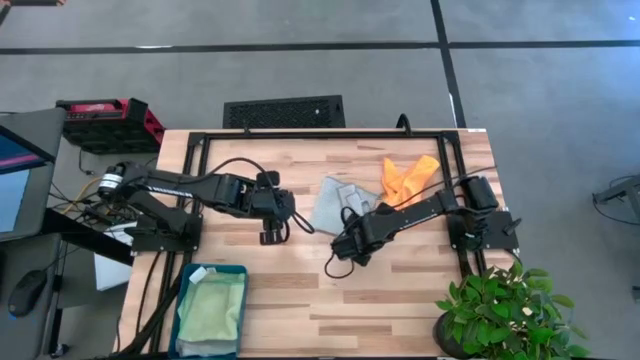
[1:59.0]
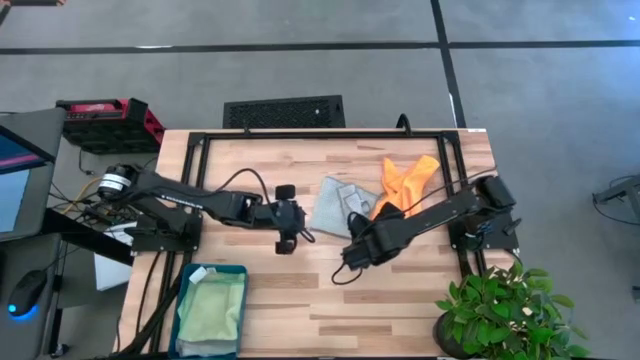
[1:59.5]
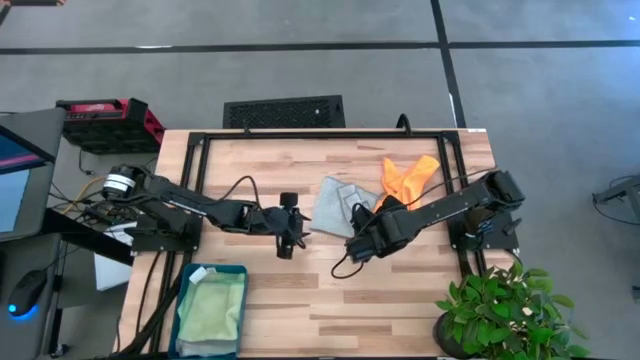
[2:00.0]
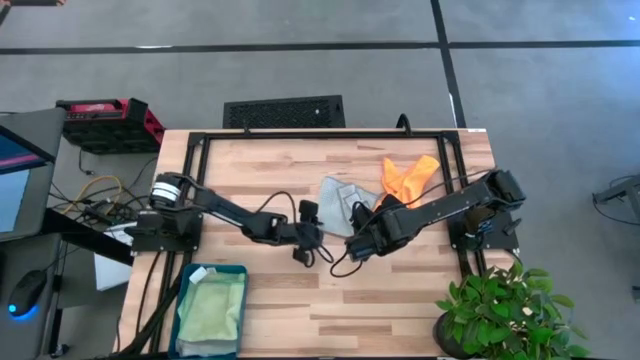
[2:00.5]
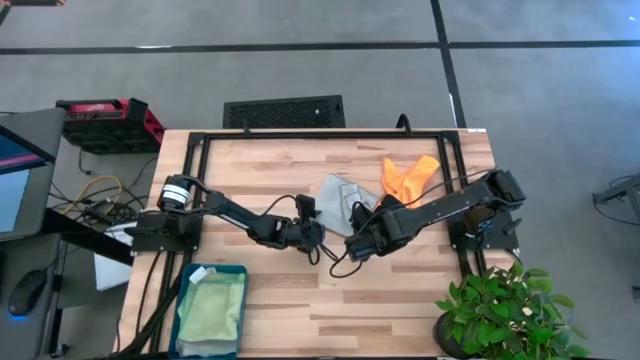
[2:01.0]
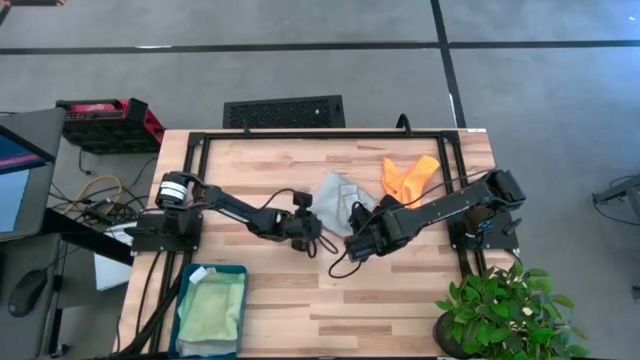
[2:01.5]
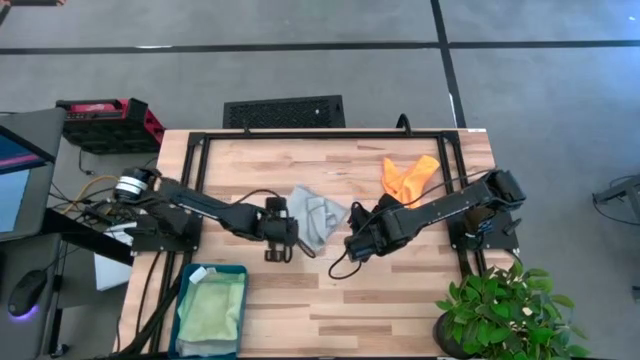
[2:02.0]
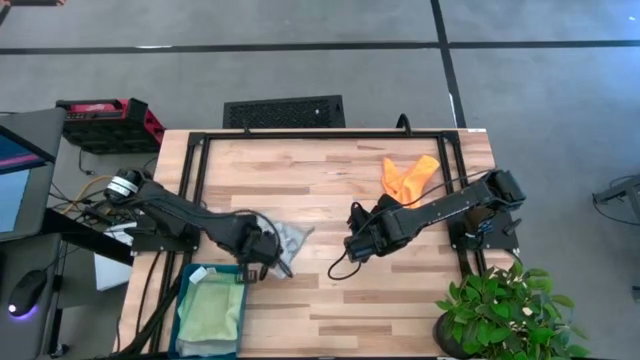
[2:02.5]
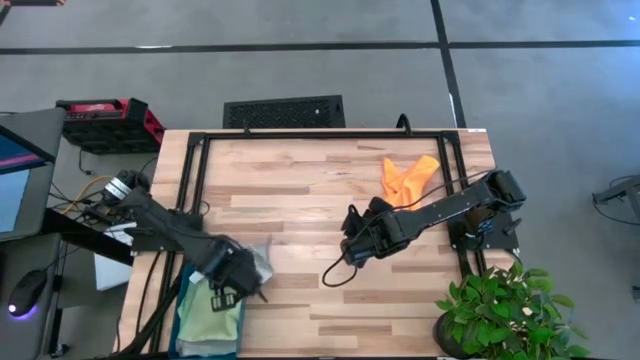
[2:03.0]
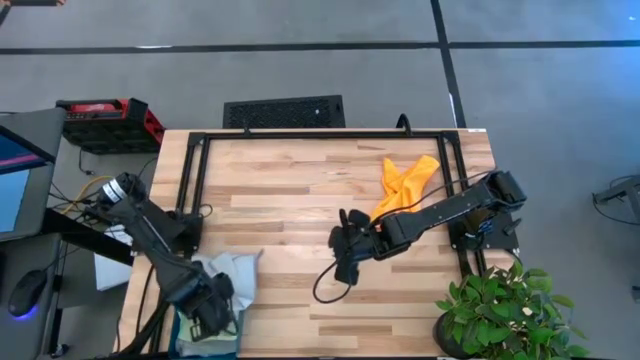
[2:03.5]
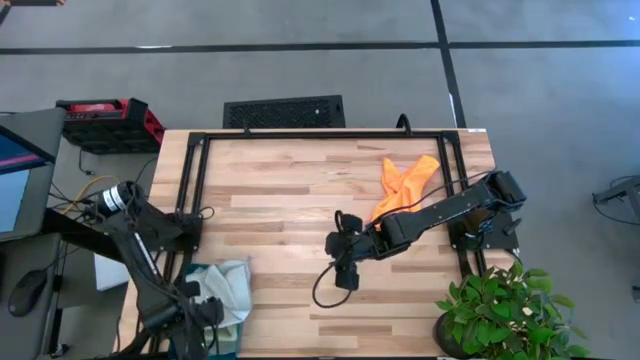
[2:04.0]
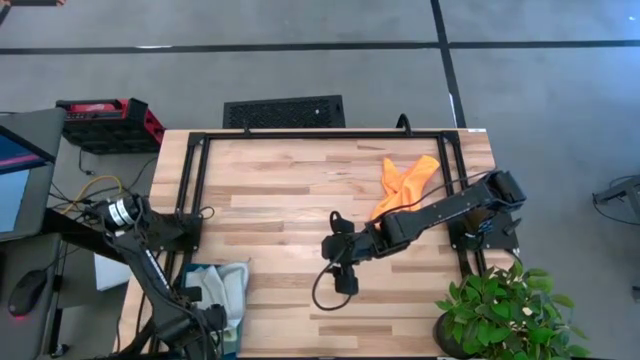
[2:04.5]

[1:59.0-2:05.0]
Task: Fold microfiber towels
Put the folded gray microfiber towel into the blue bin

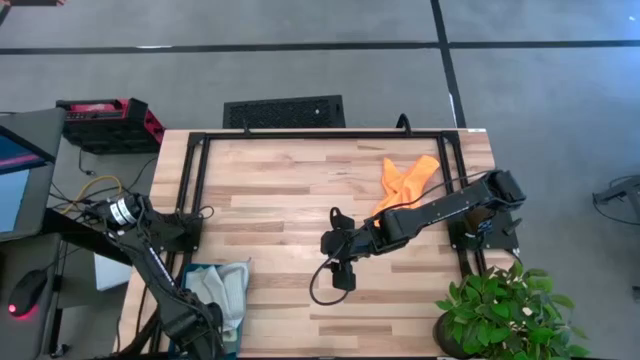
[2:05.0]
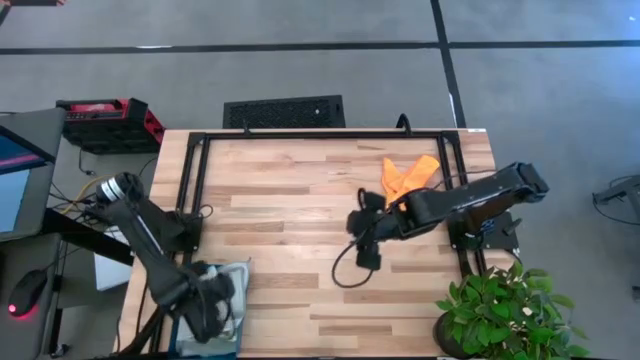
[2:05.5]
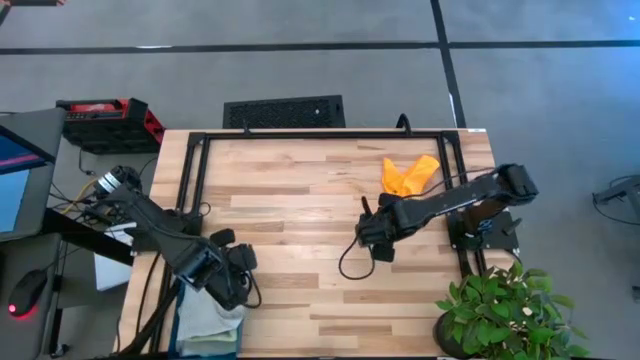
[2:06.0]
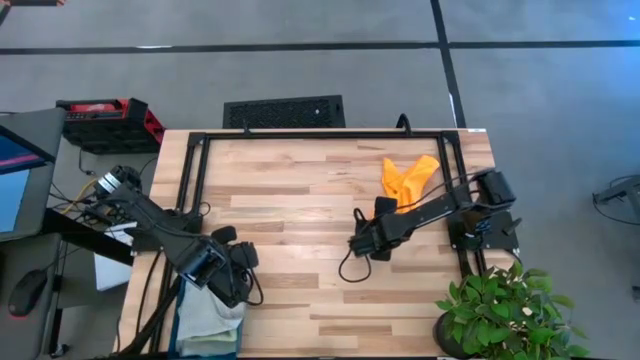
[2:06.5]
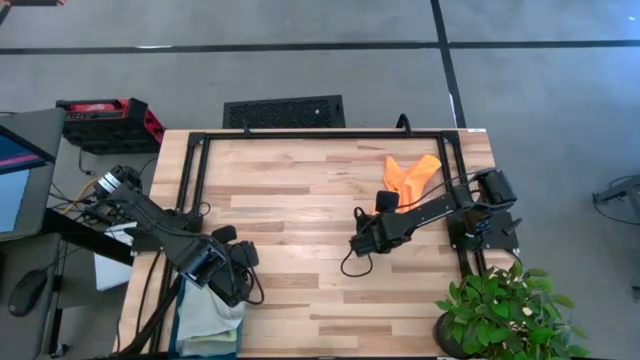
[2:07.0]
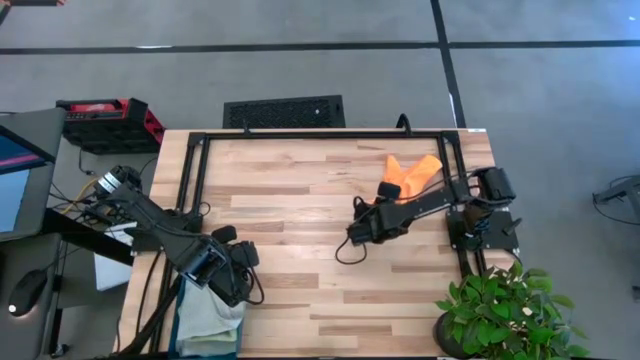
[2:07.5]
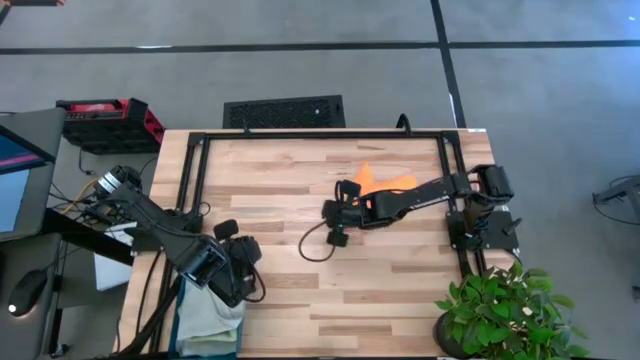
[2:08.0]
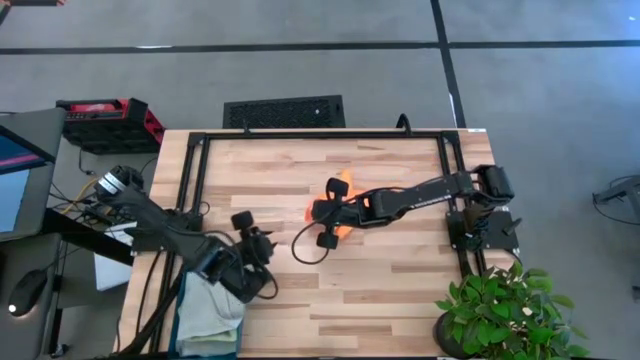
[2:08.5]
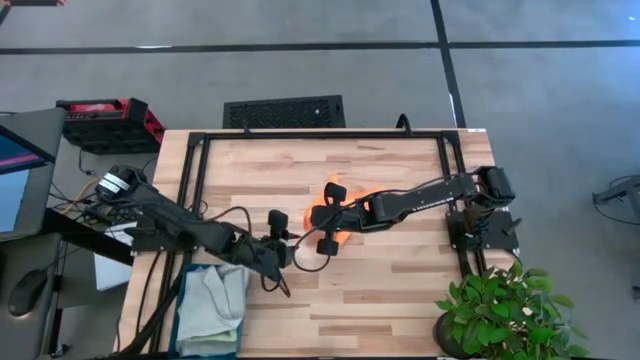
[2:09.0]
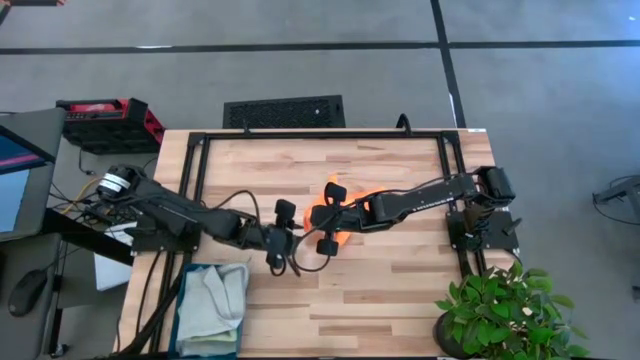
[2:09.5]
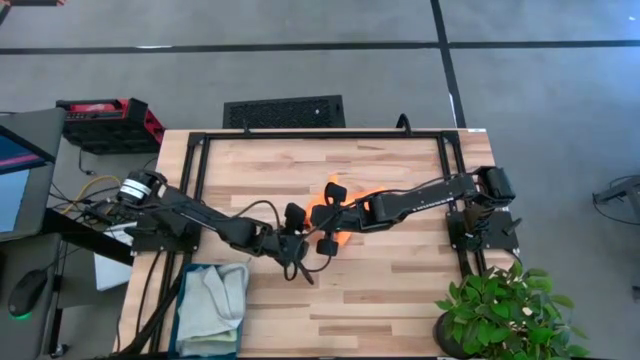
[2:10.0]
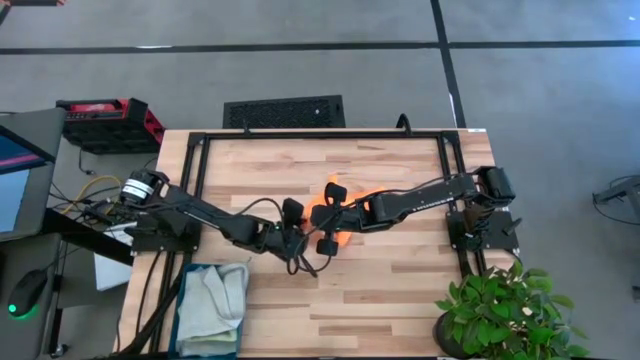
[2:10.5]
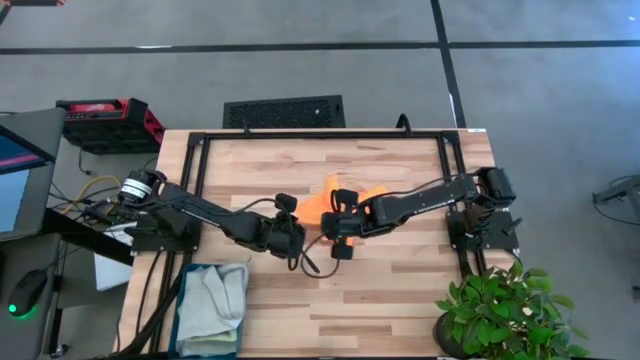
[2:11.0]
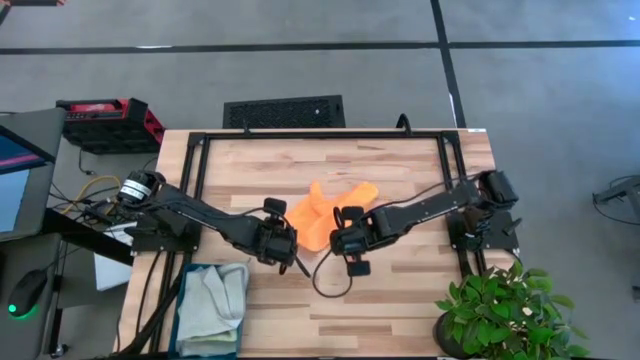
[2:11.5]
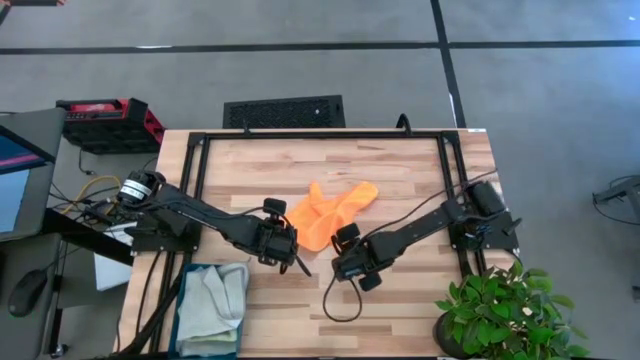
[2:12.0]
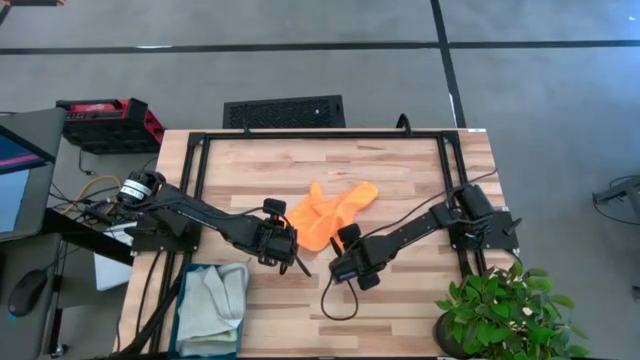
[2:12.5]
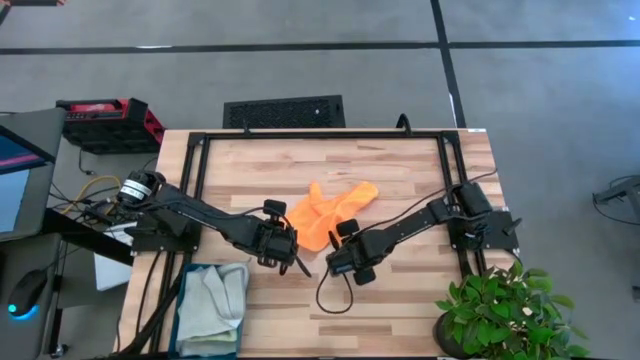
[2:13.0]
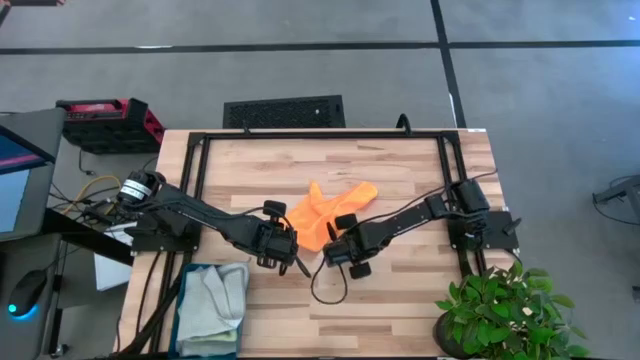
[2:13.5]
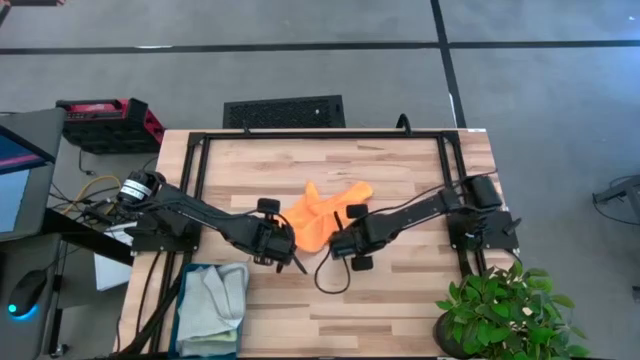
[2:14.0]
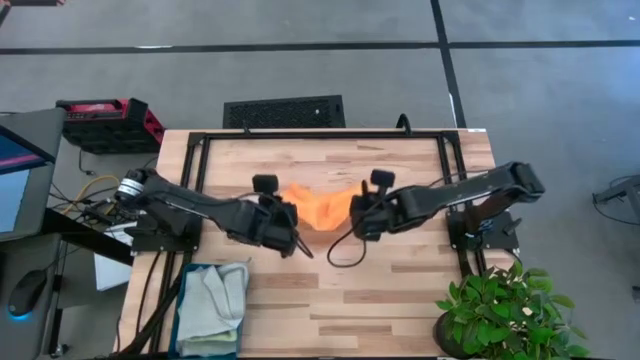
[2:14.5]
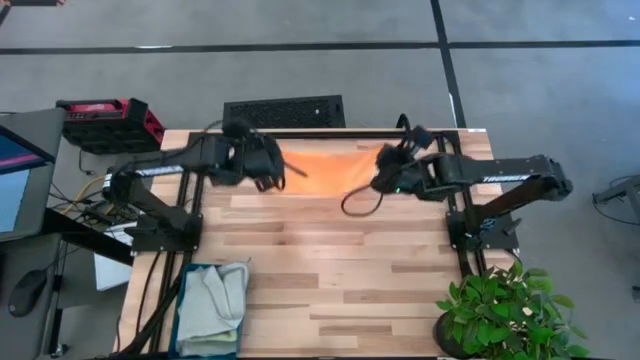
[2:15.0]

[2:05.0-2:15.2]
Fold the orange microfiber towel

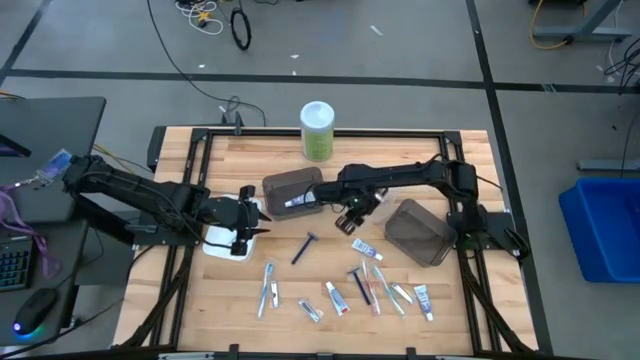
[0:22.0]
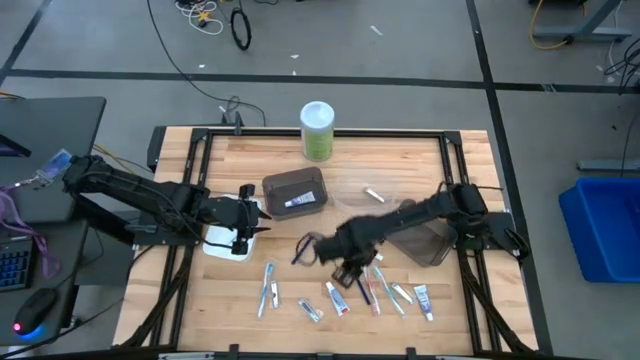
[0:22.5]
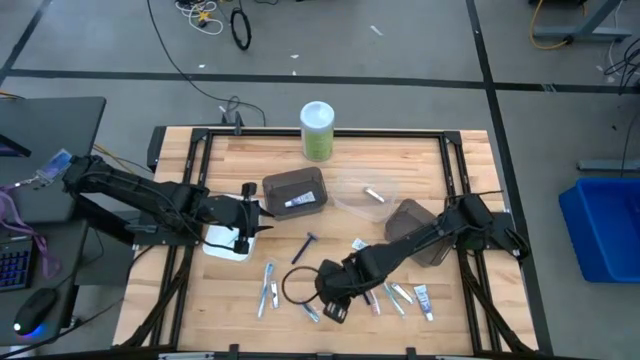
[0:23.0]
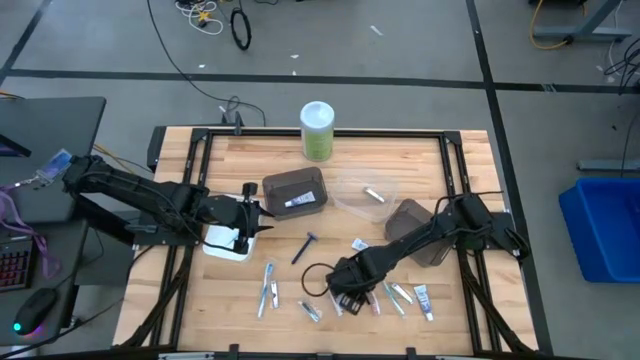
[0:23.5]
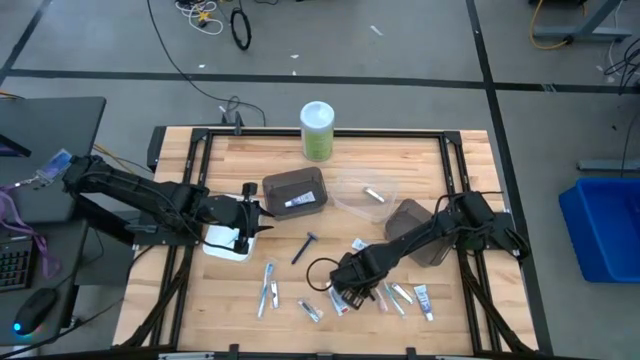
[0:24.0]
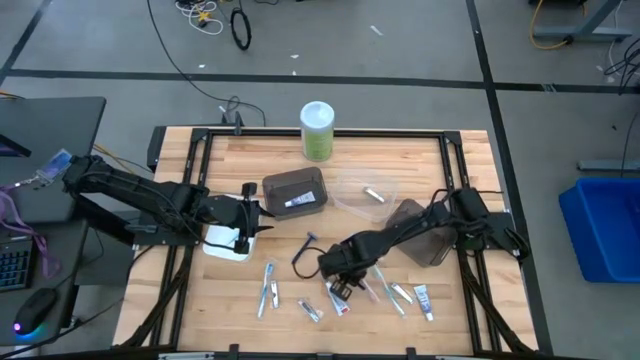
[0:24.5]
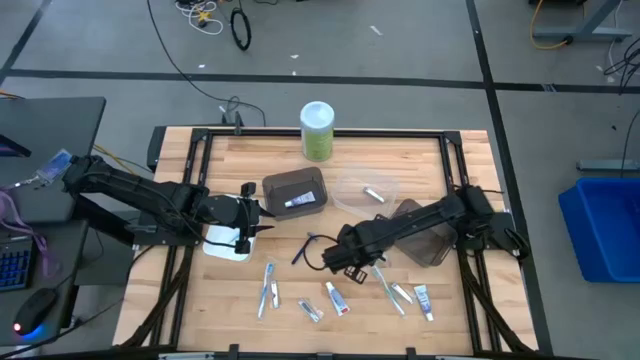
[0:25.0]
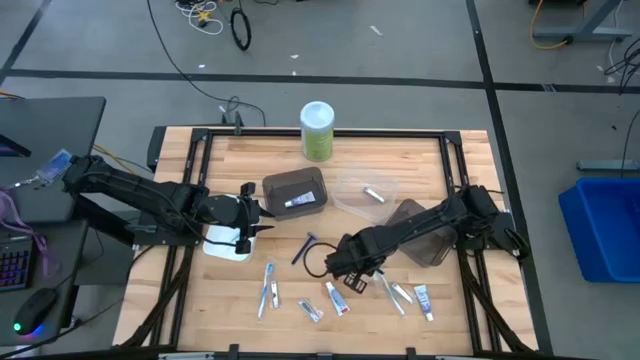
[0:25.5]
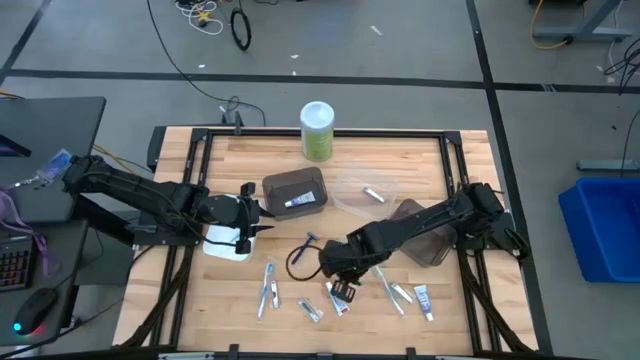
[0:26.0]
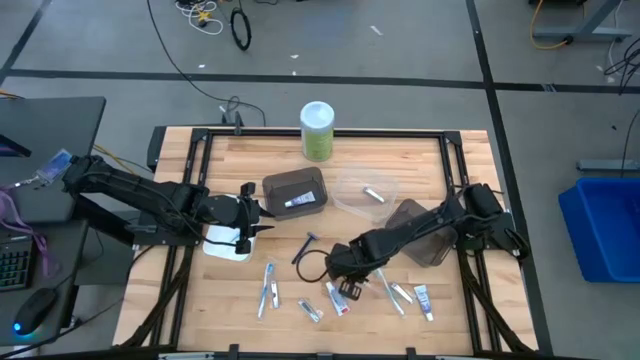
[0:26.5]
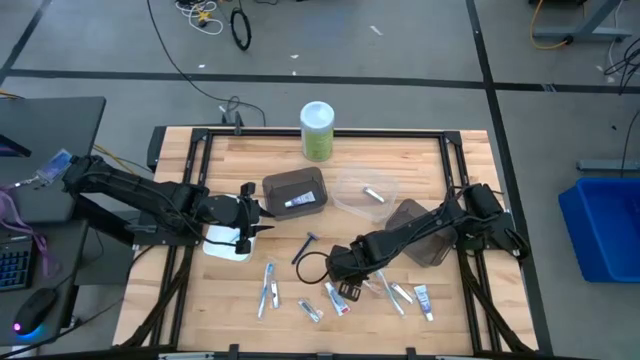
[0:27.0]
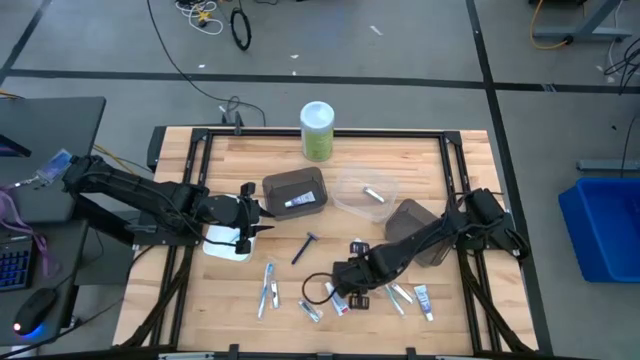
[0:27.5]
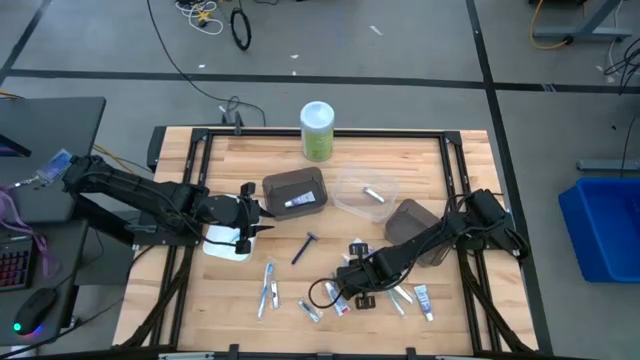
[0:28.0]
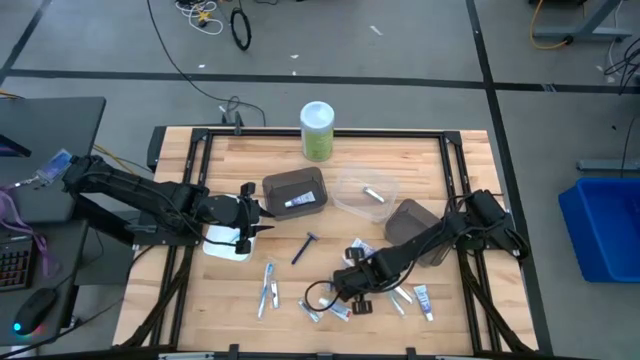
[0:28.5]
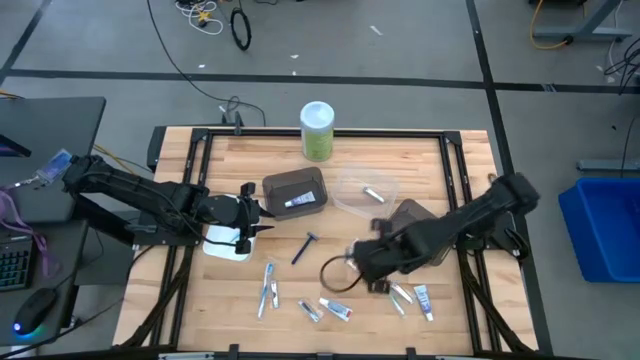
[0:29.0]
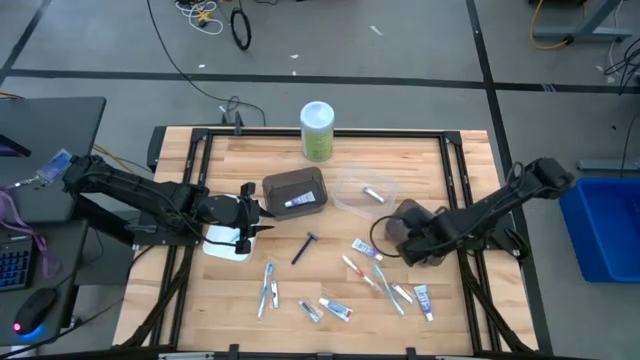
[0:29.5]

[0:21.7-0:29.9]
Task: Pick & Place Travel size toiletries
Put the razor into the right black bin
